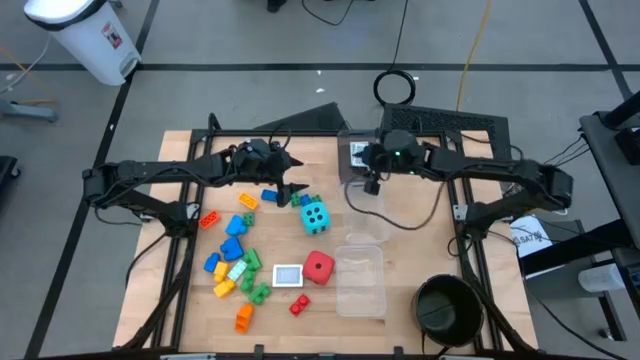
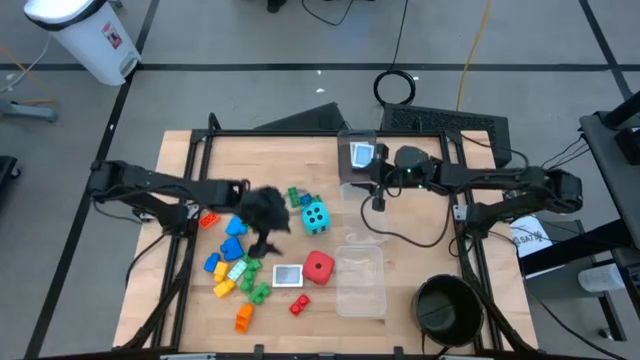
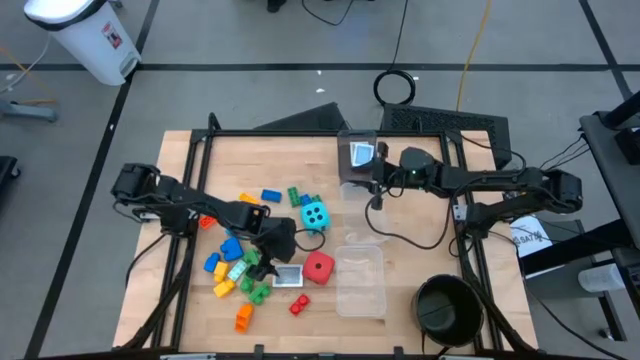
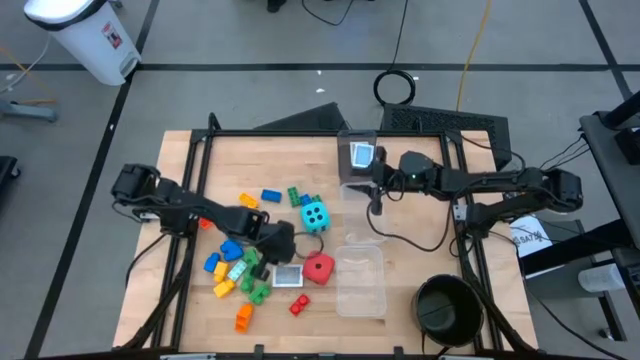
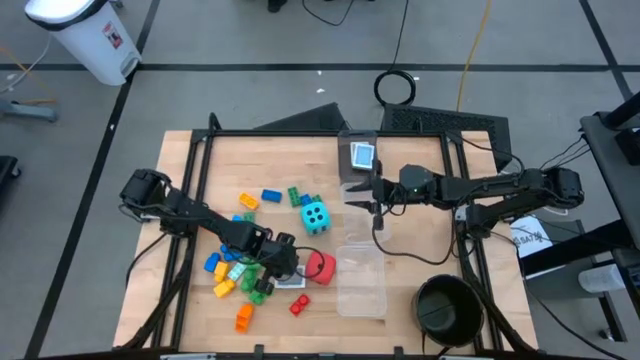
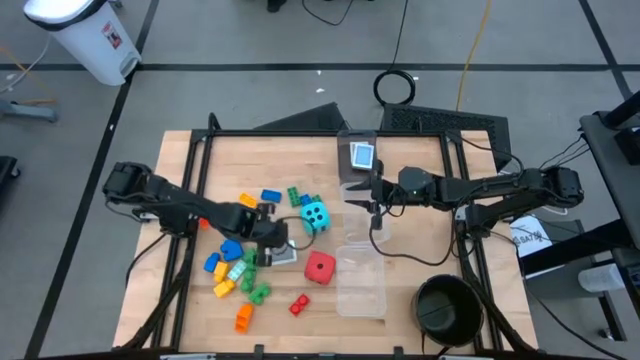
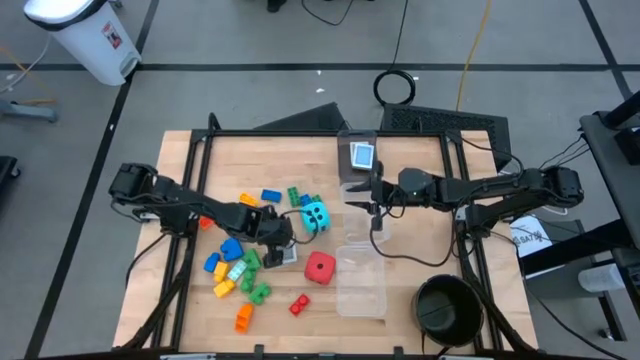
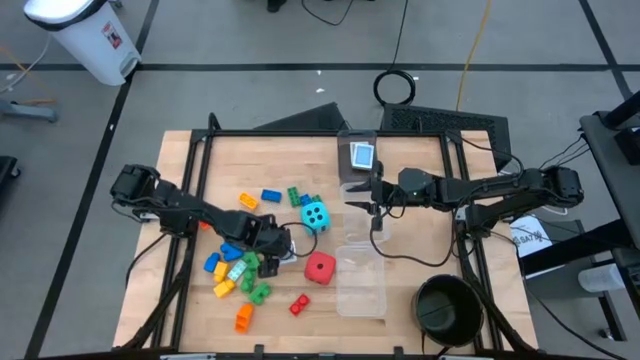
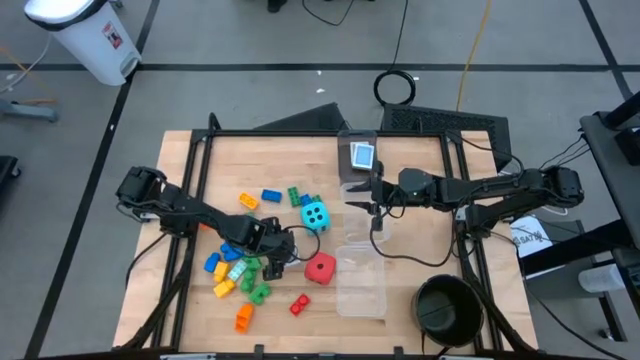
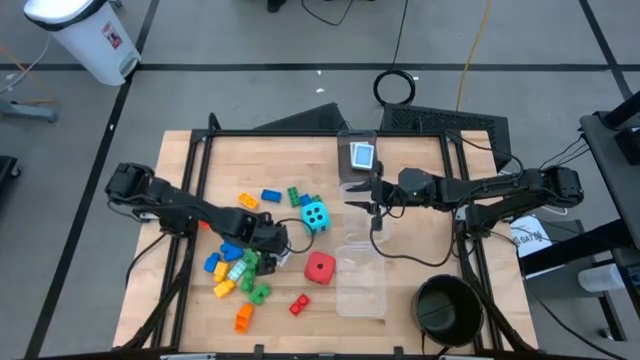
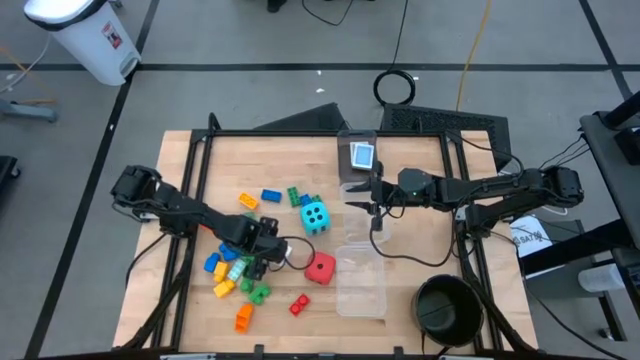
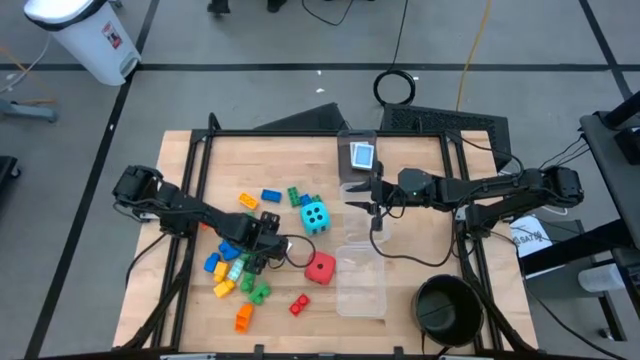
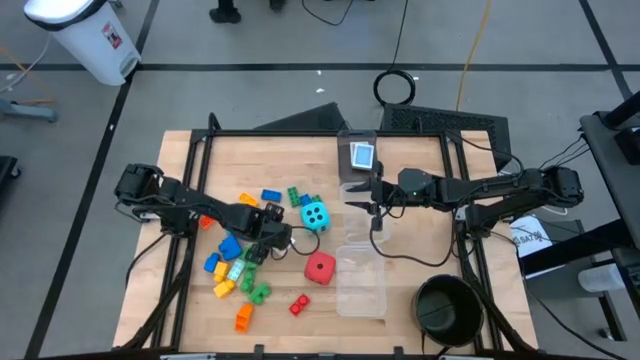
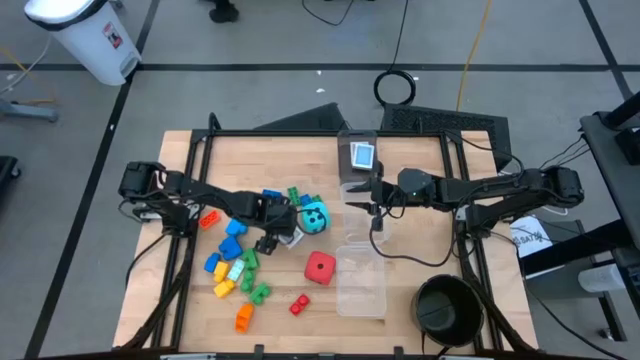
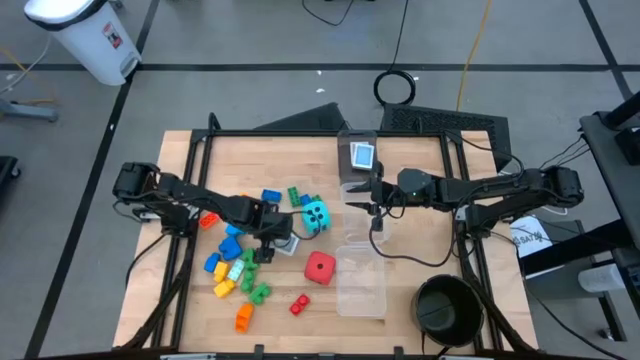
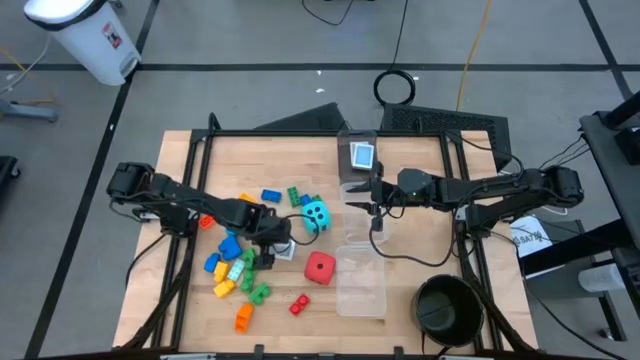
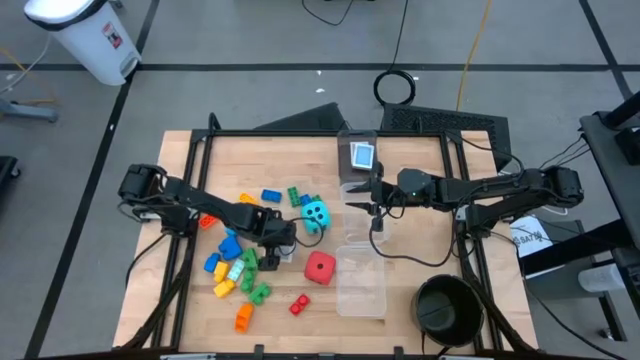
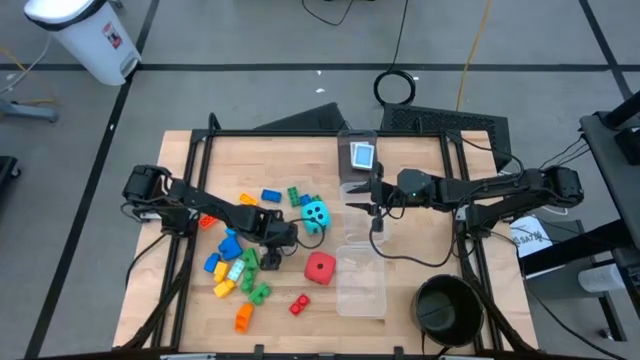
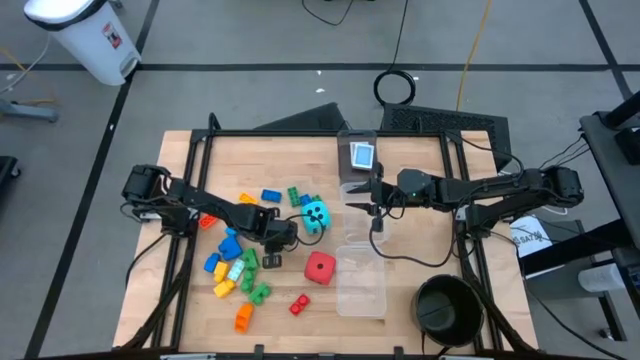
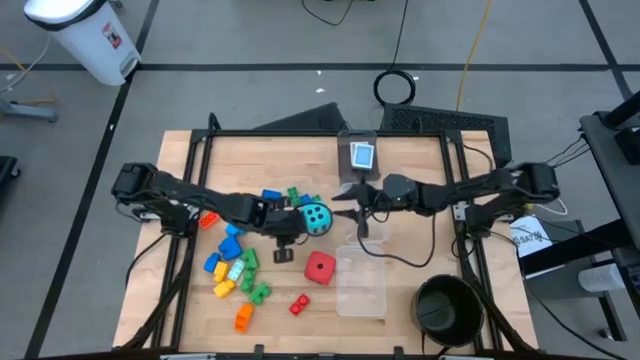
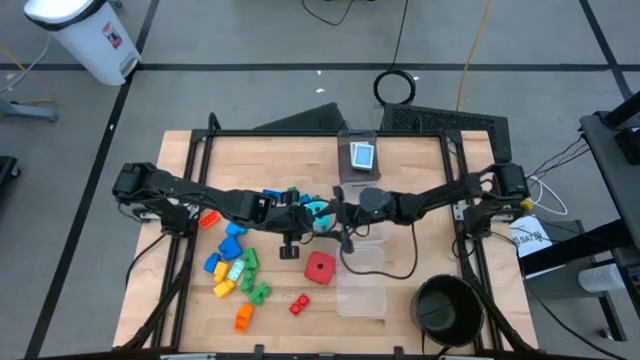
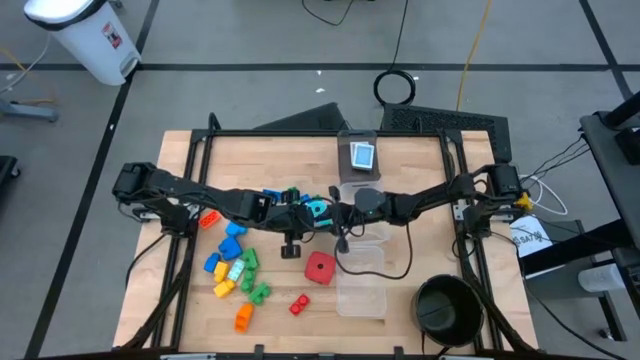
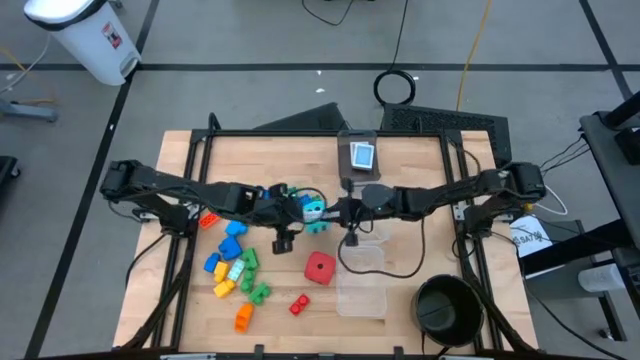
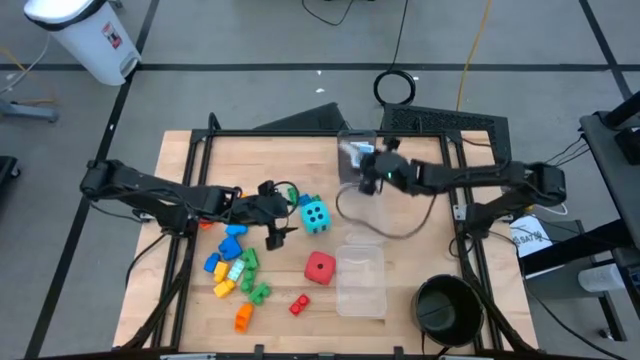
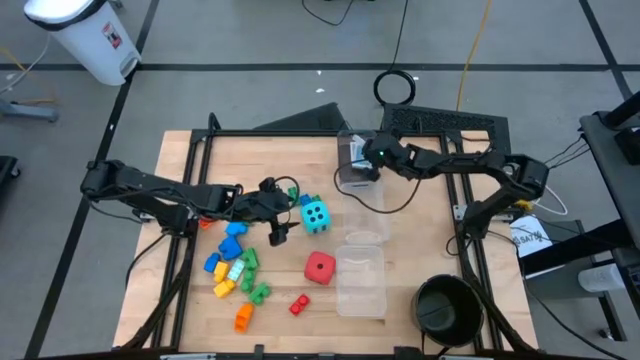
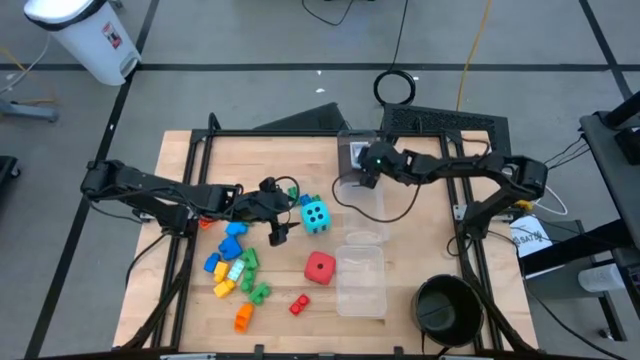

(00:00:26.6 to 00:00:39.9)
Task: Pick & Place Toys
Put the playing cards into the upper black bin

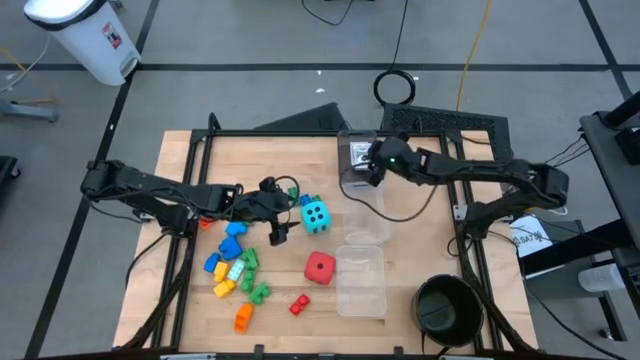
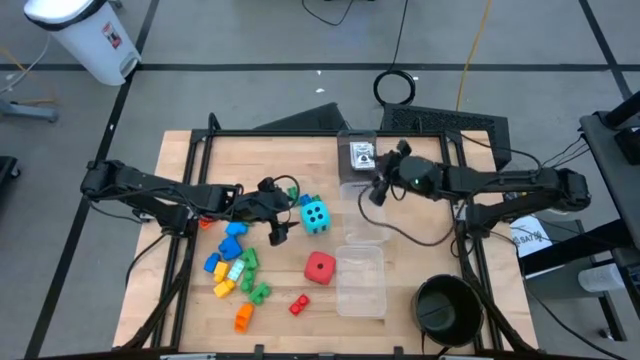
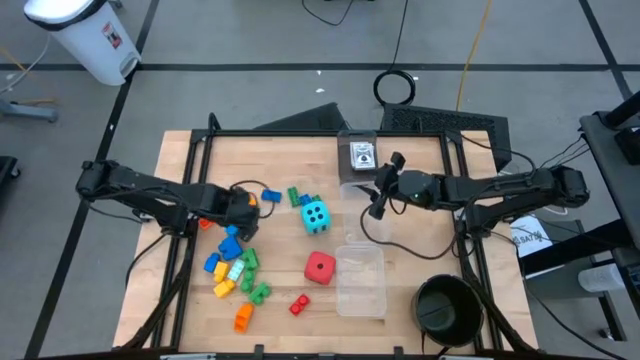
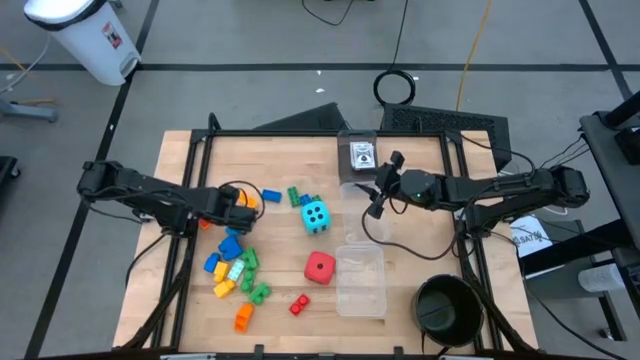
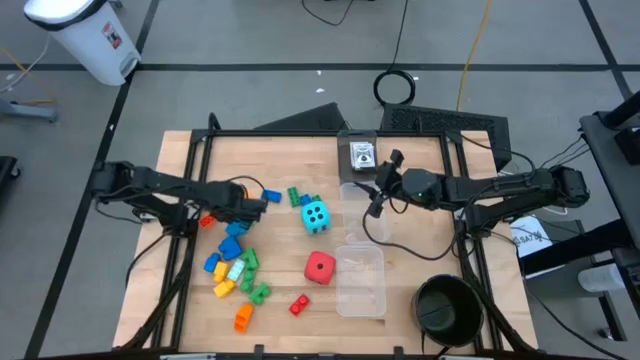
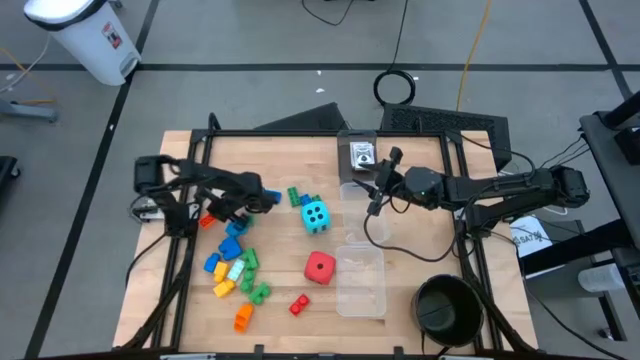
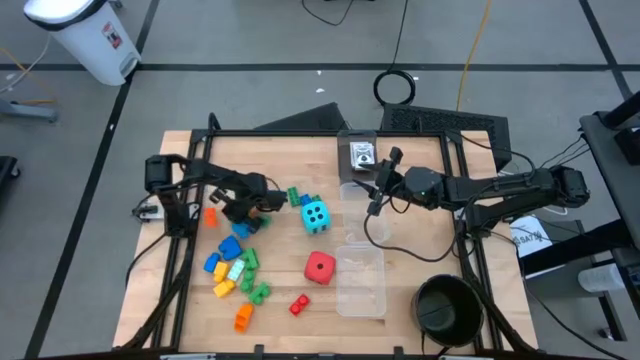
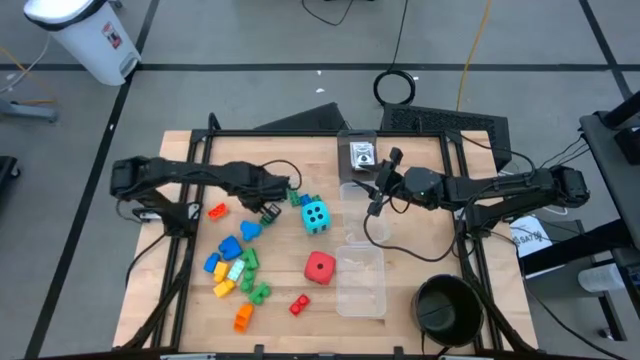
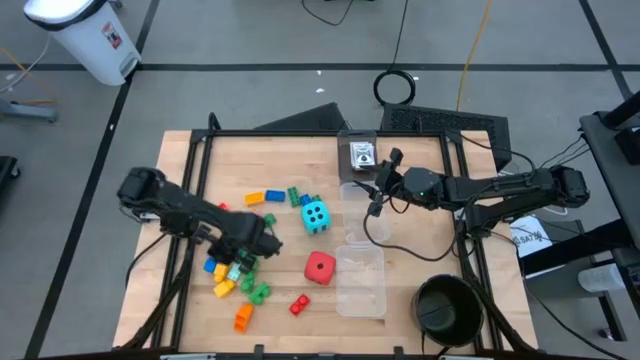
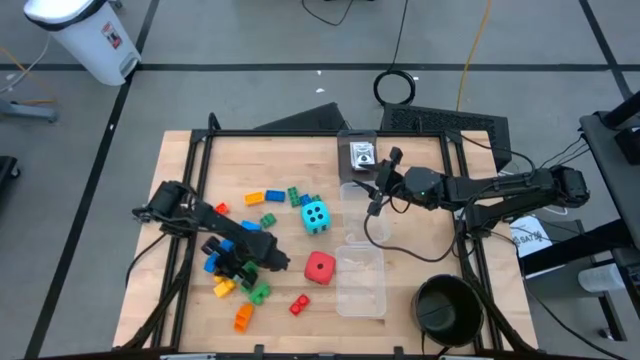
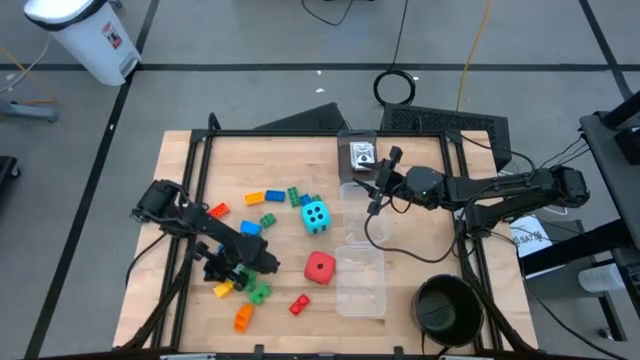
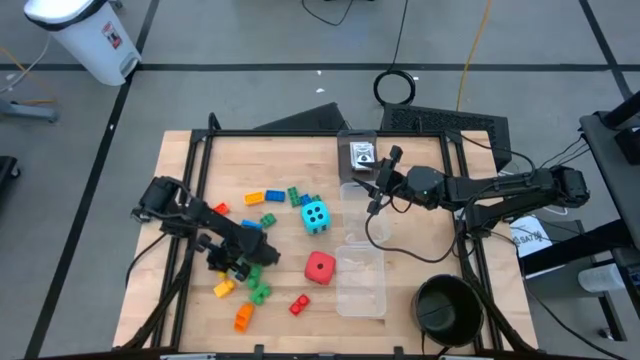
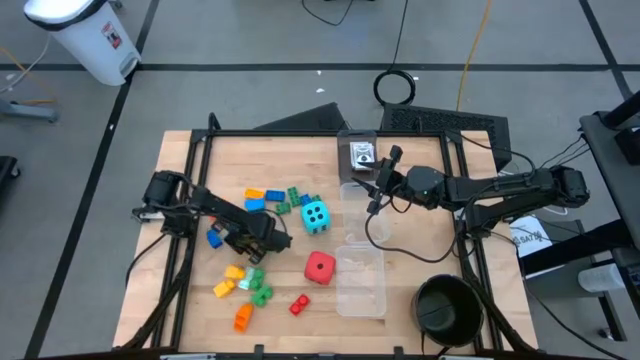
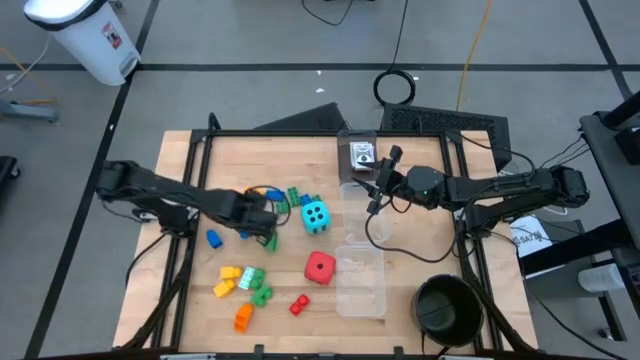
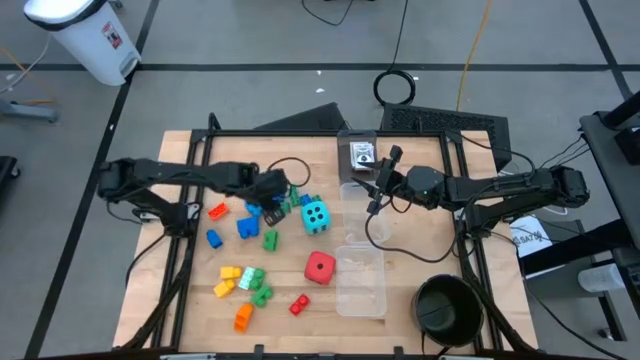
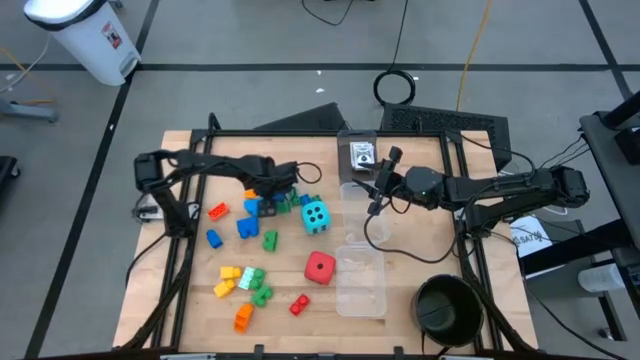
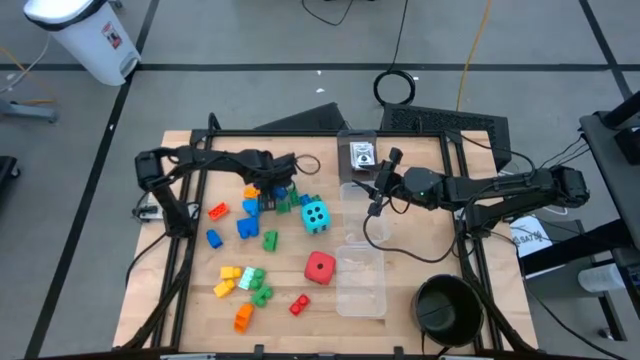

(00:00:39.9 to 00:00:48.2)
Put the blue 8 stud game piece into the middle transparent bin
